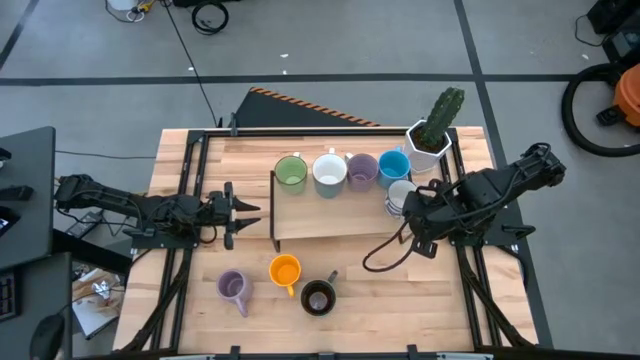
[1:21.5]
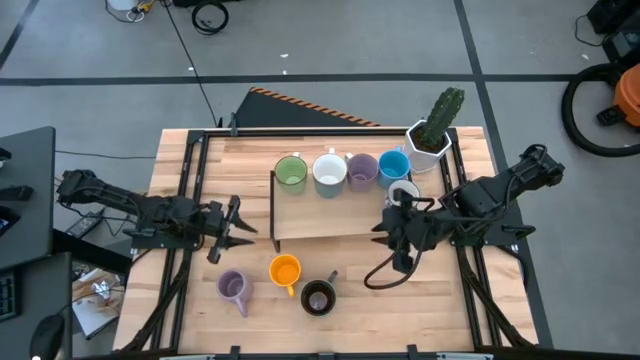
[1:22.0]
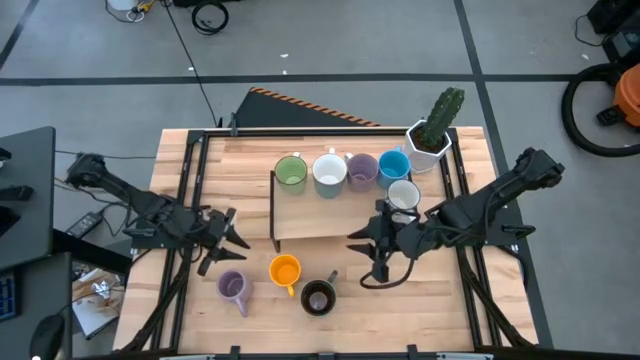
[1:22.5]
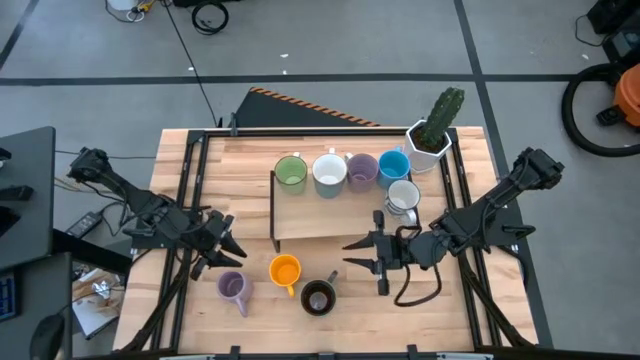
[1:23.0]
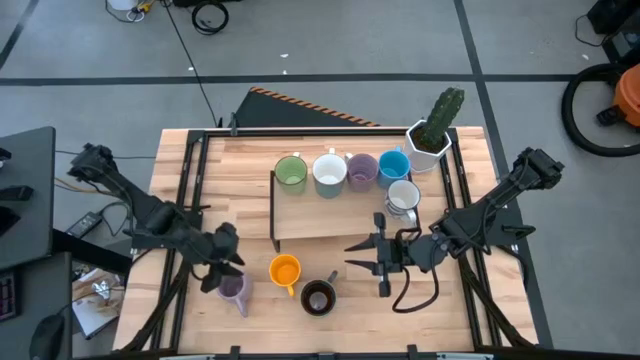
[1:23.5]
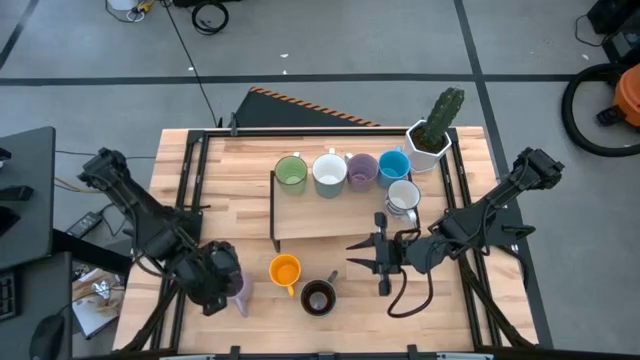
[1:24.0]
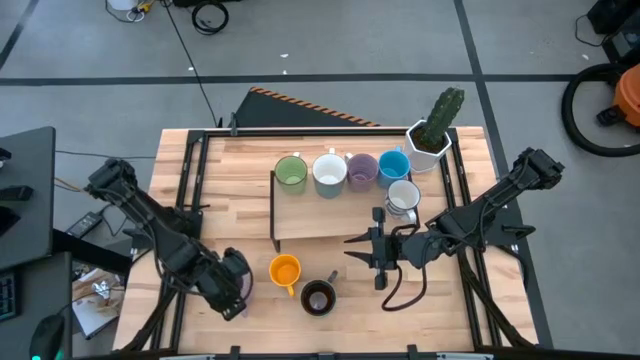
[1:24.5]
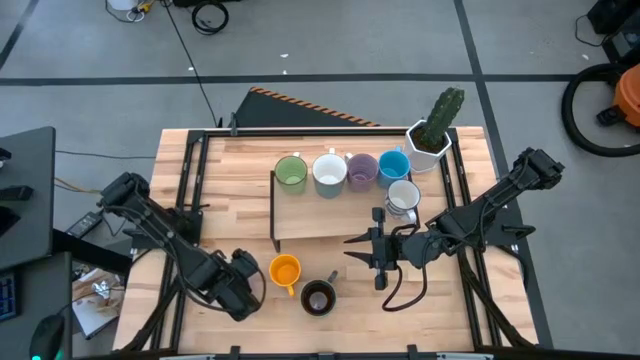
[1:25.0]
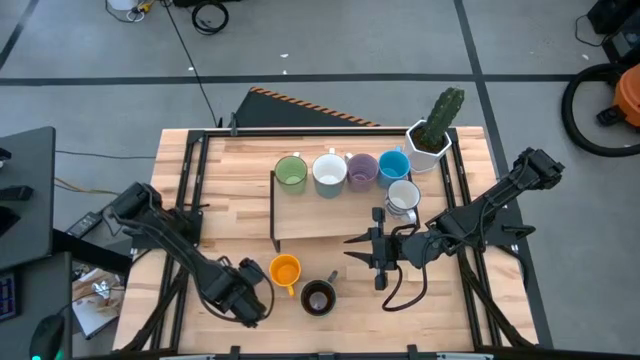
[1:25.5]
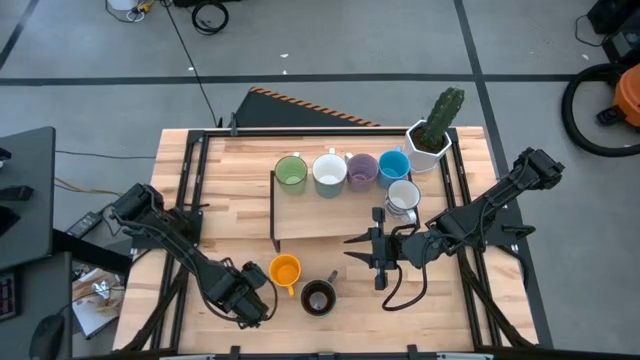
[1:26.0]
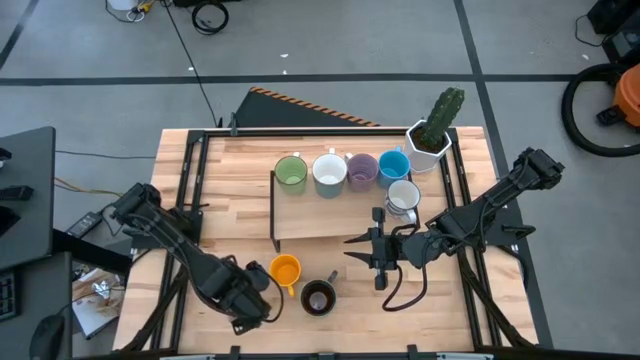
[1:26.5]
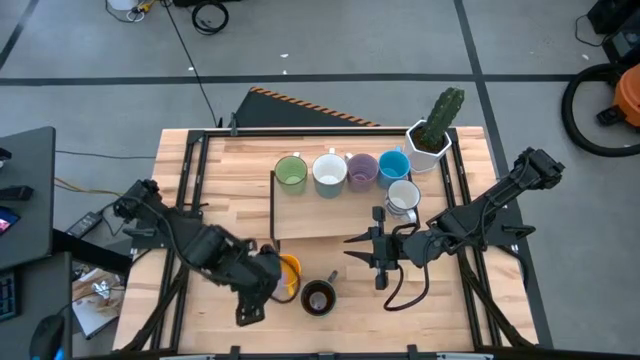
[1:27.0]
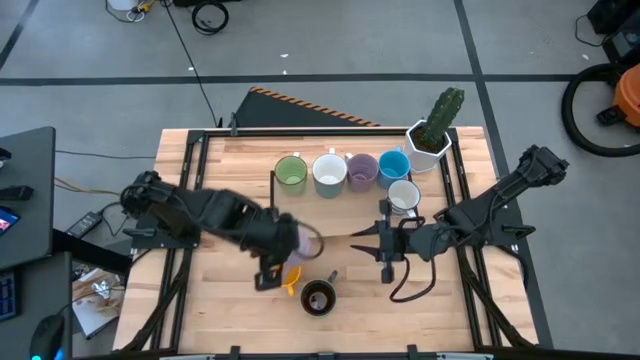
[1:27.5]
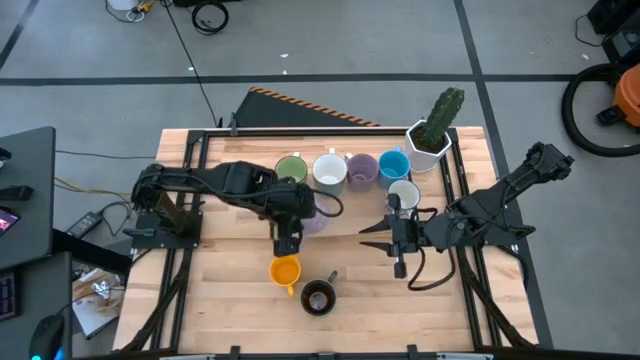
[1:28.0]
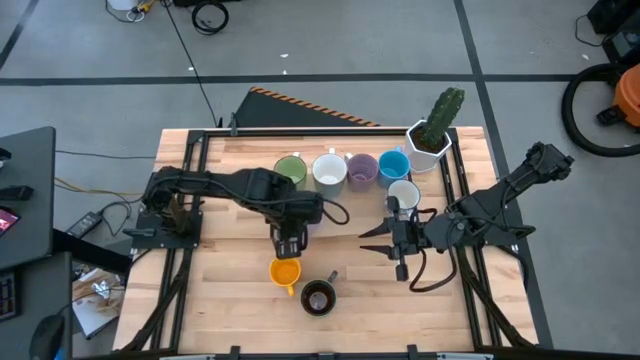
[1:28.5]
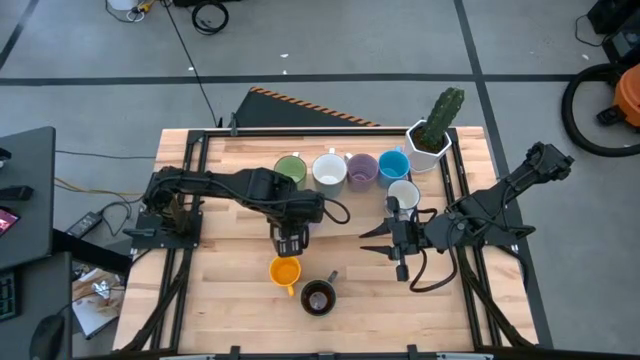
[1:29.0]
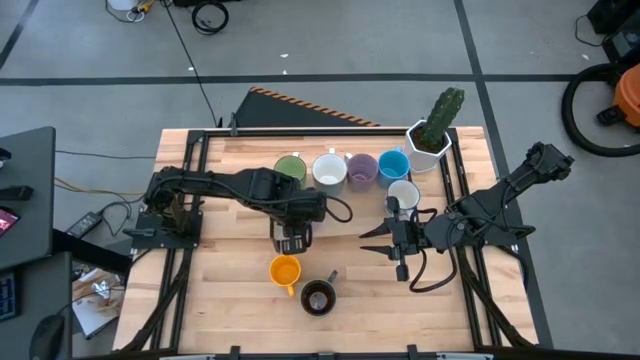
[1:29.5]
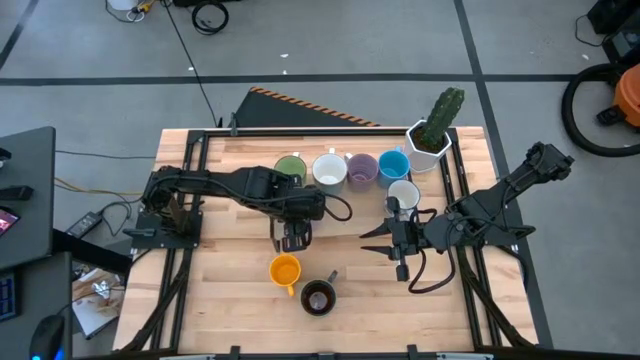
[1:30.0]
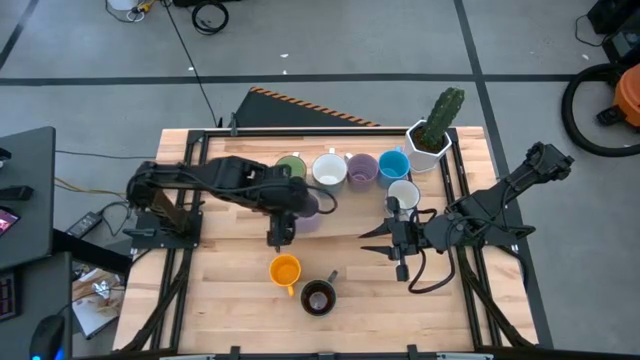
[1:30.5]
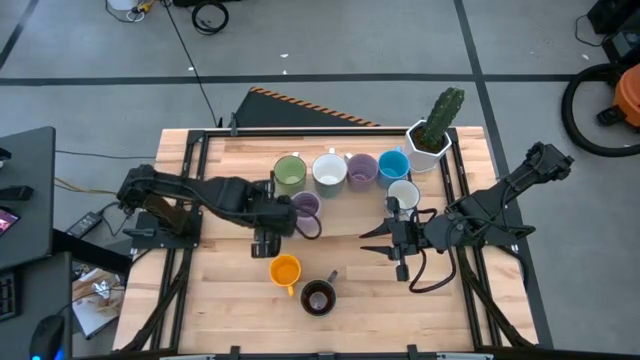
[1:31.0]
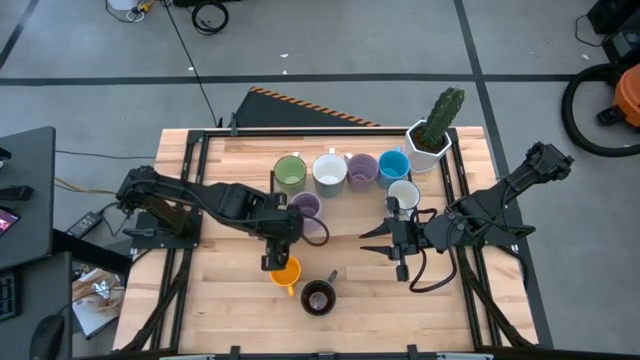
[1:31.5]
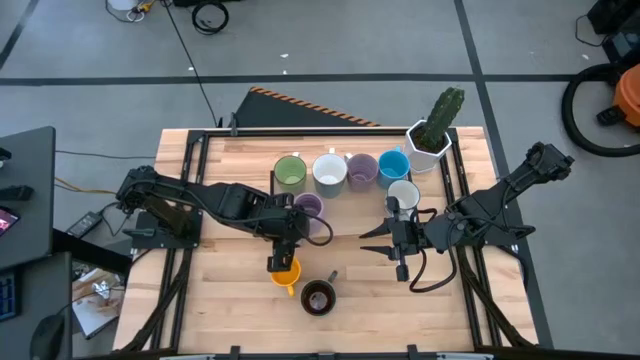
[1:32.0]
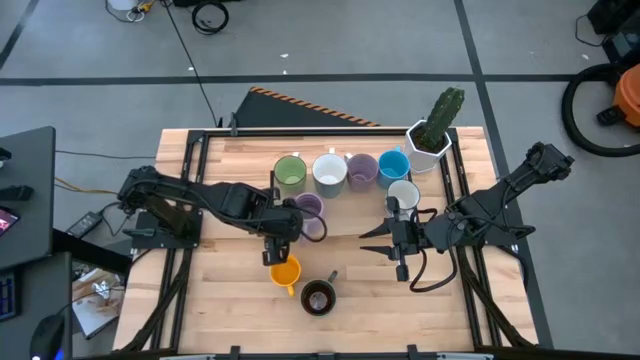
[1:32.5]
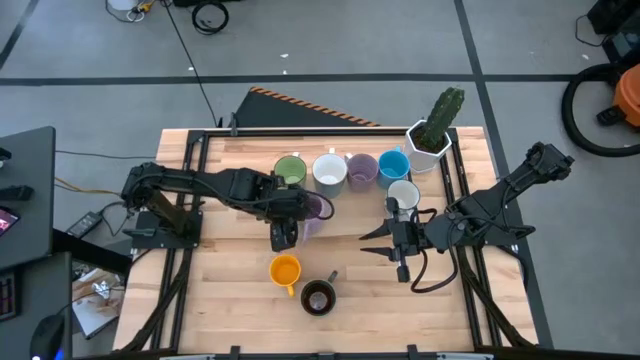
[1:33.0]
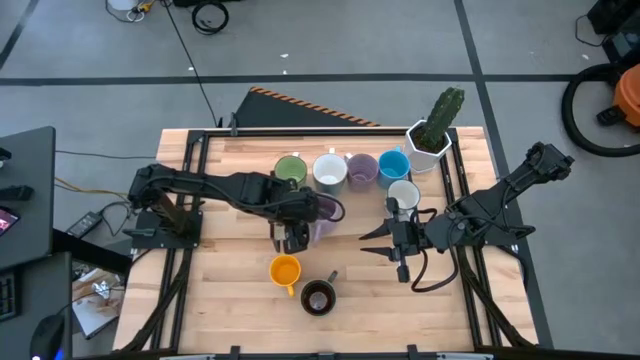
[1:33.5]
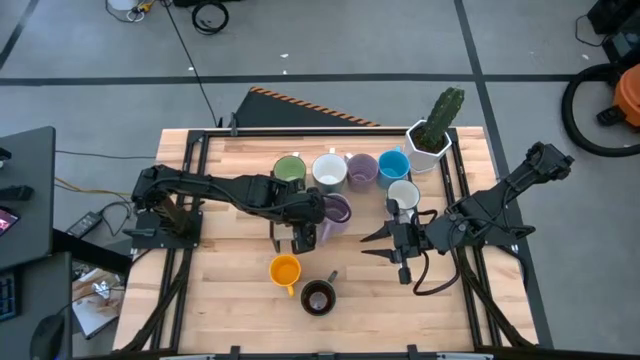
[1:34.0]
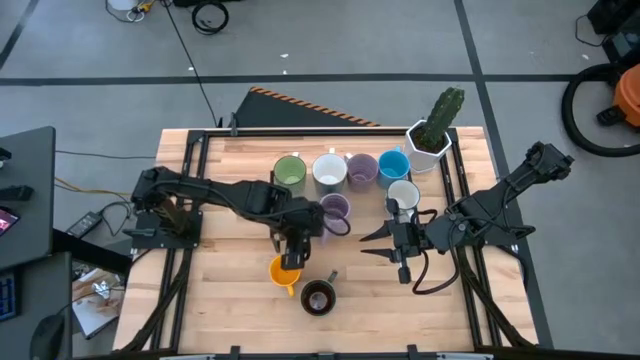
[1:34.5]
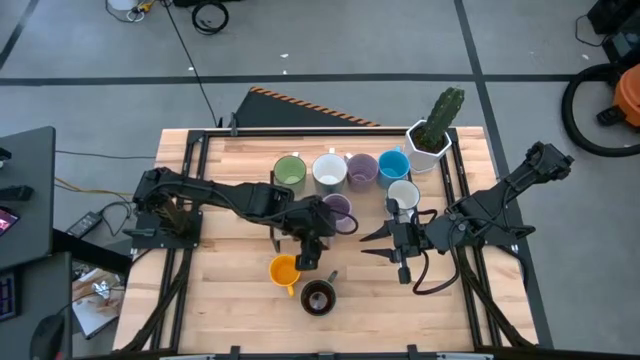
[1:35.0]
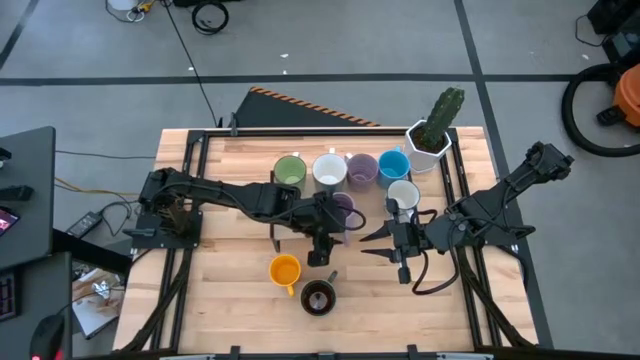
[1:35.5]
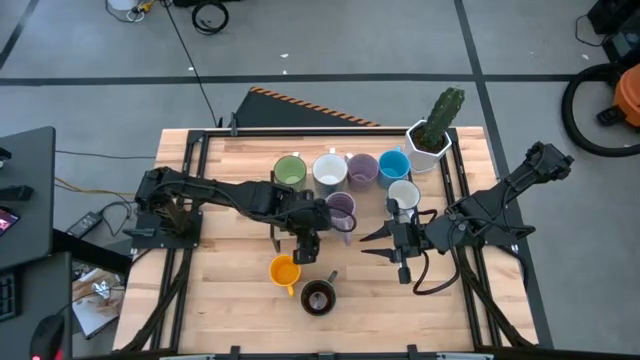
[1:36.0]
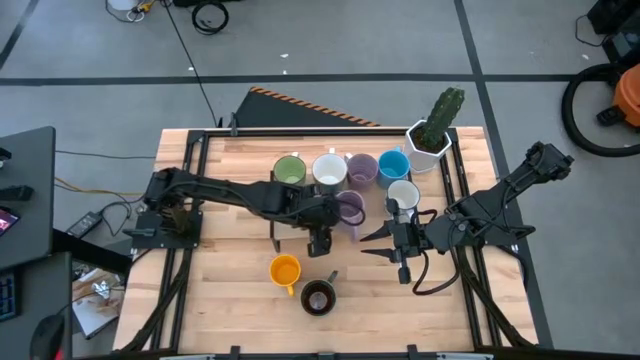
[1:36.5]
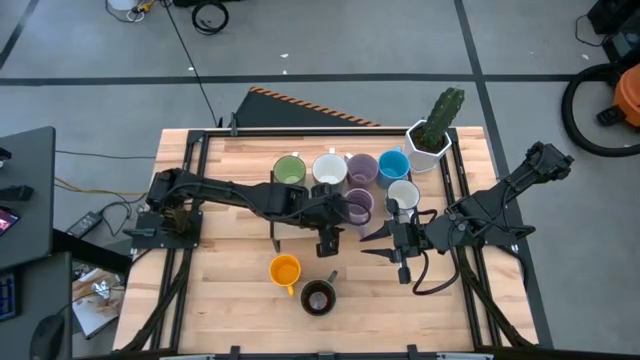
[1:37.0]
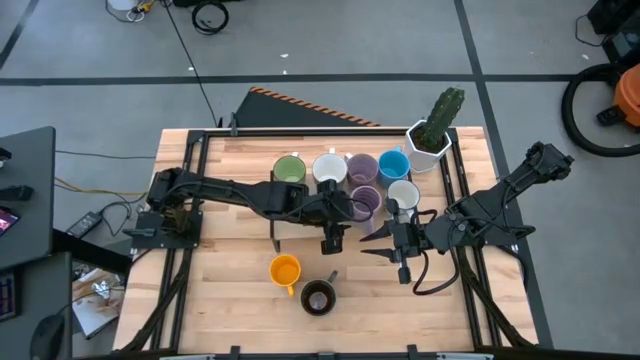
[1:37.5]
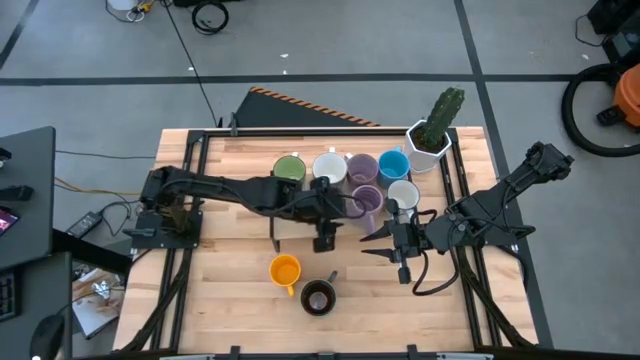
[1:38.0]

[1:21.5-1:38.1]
Task: Place coffee mugs
Put the purple cup on the shelf aligned with the other purple cup

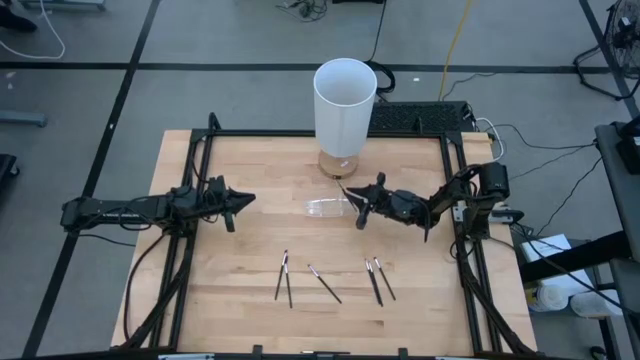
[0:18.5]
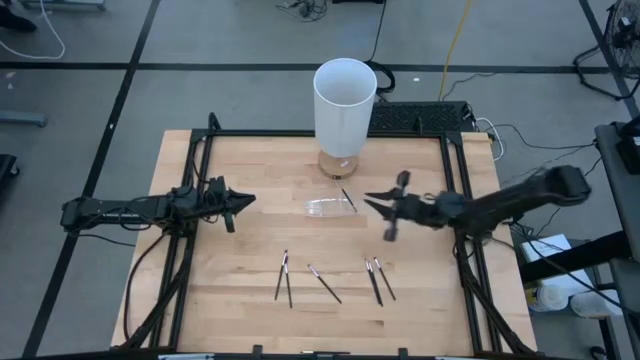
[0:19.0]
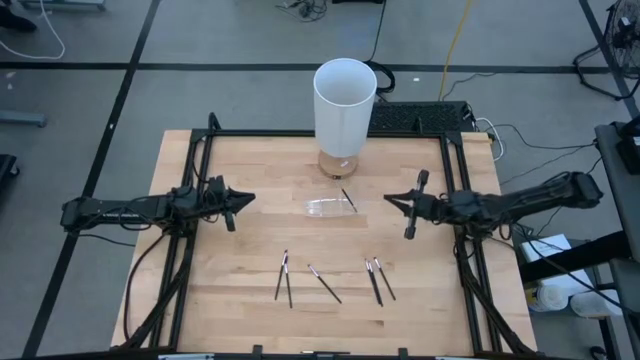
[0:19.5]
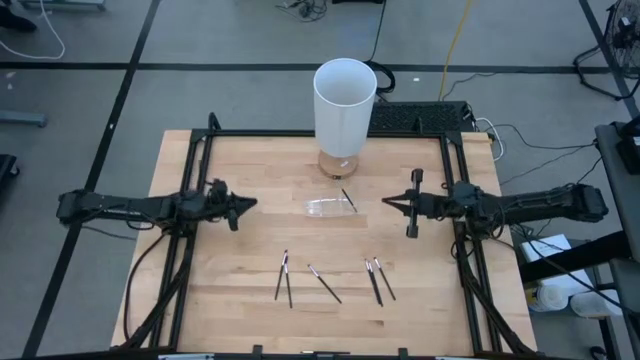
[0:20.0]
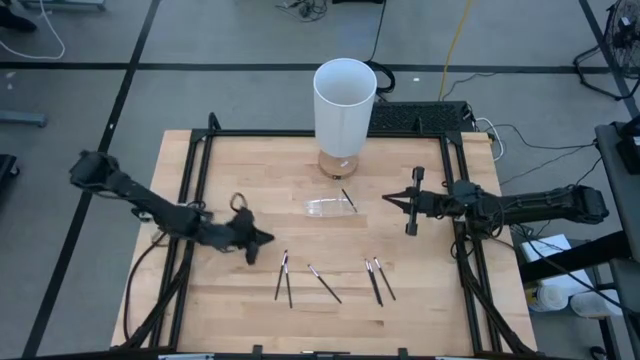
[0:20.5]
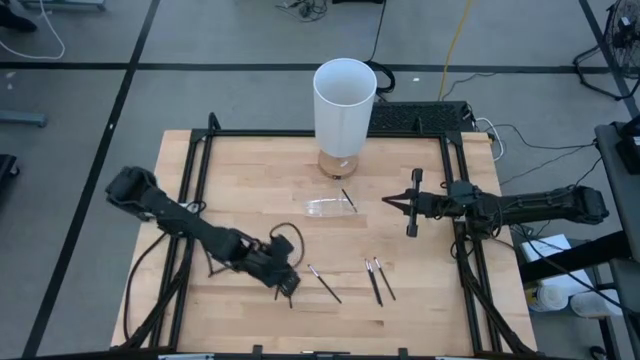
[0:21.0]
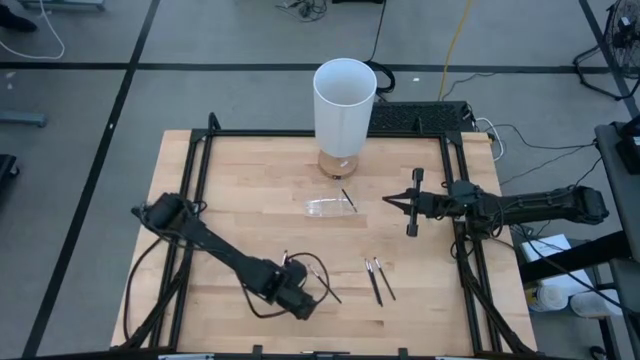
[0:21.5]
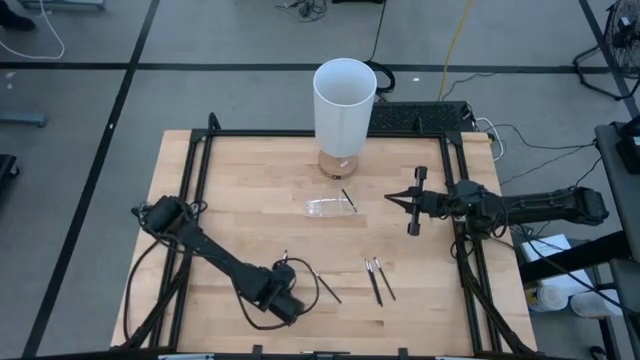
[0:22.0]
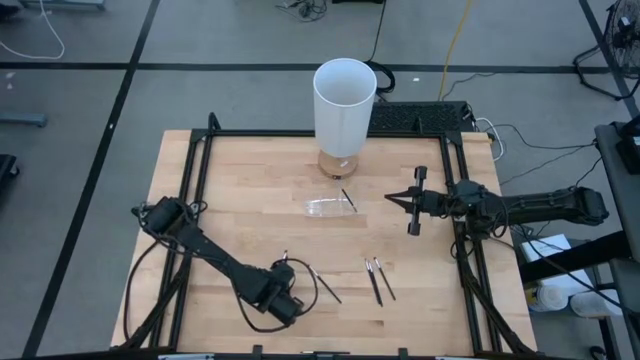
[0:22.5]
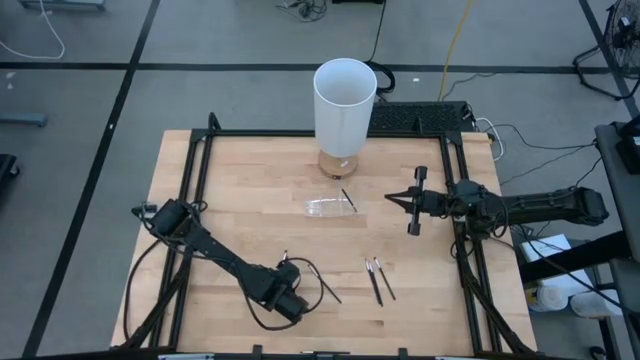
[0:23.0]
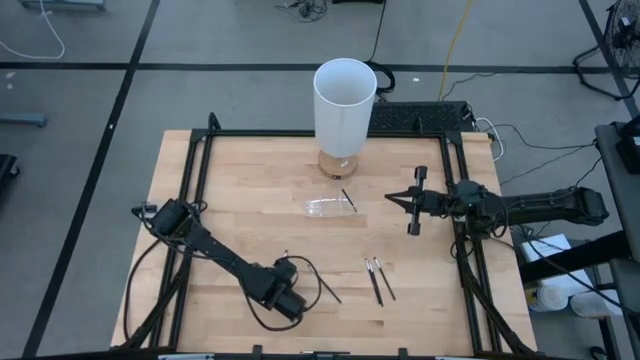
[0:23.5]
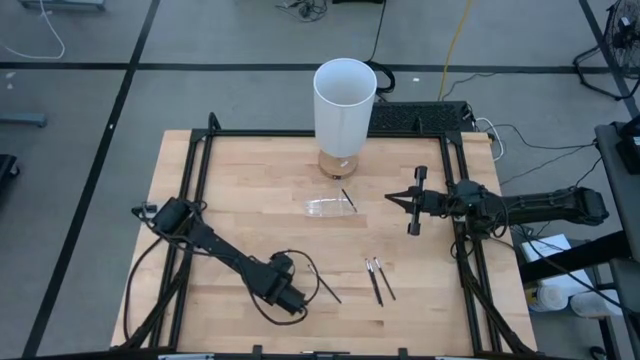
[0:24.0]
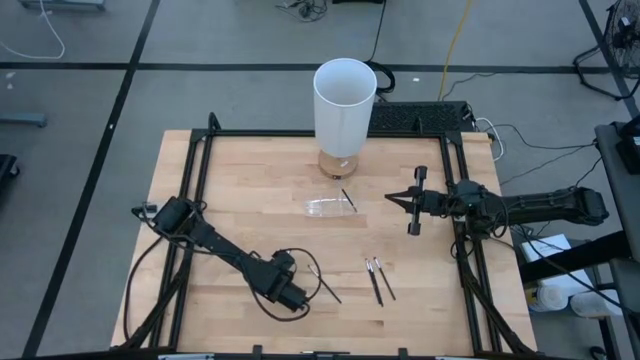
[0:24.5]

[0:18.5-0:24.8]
Task: Put items in baskets/containers
Move the eyeshadow brush
